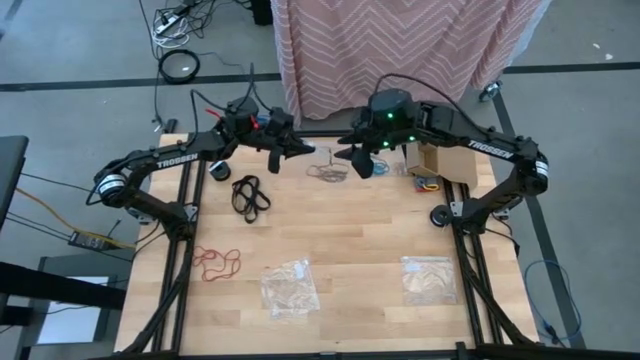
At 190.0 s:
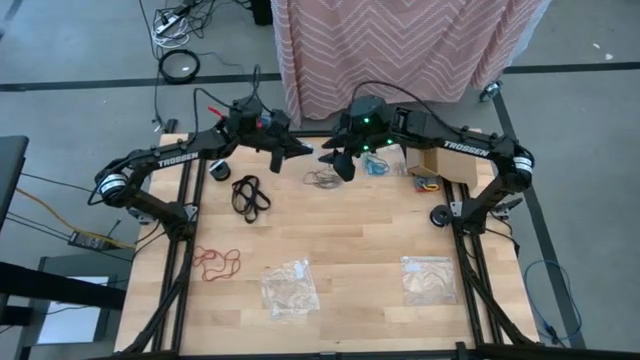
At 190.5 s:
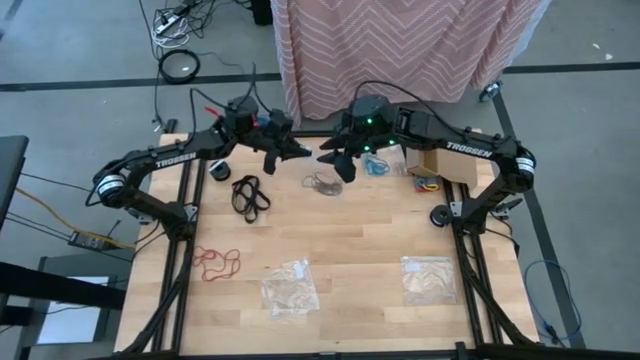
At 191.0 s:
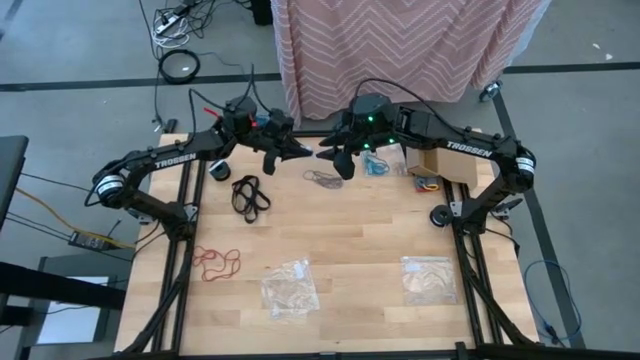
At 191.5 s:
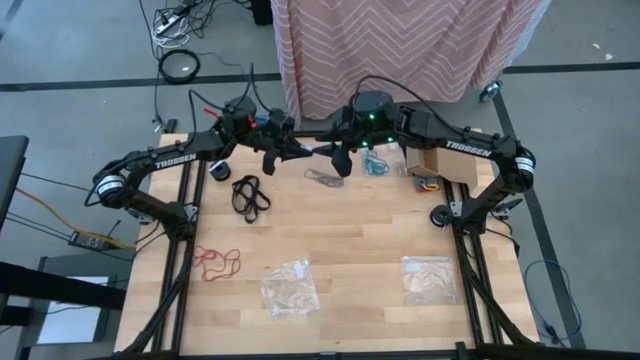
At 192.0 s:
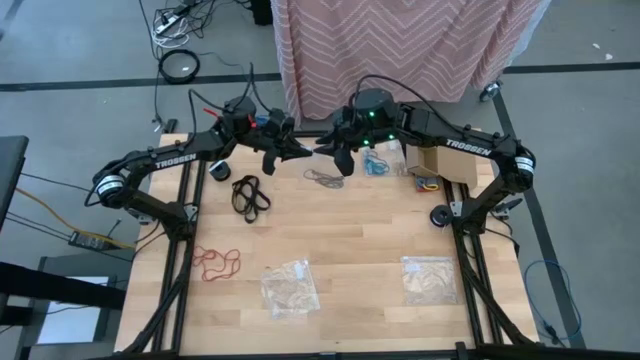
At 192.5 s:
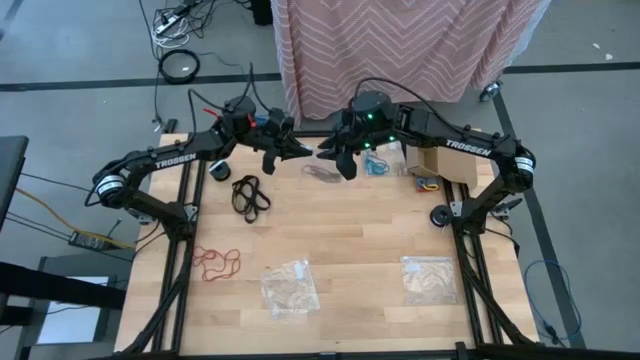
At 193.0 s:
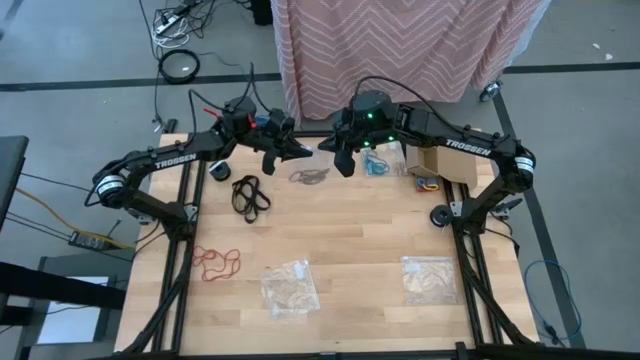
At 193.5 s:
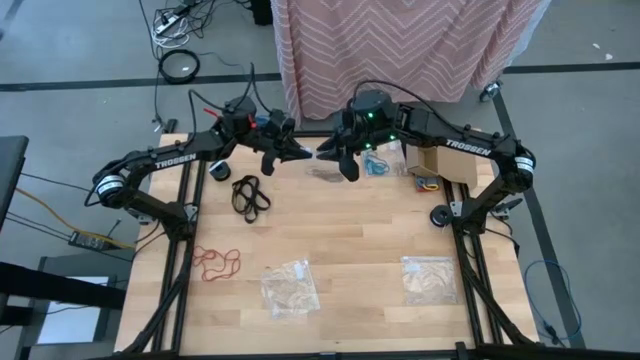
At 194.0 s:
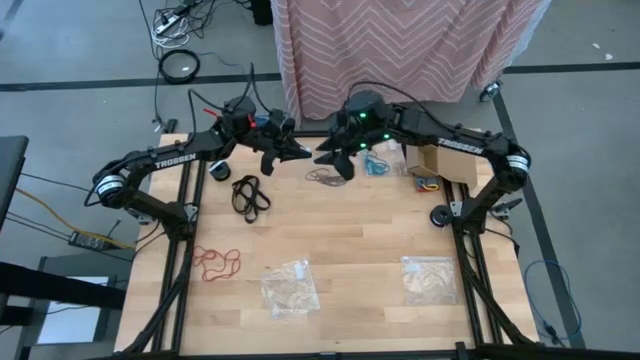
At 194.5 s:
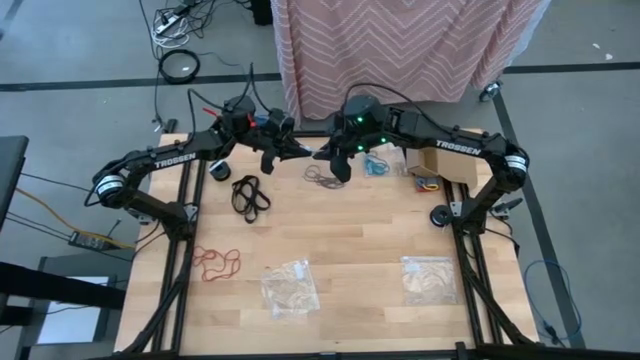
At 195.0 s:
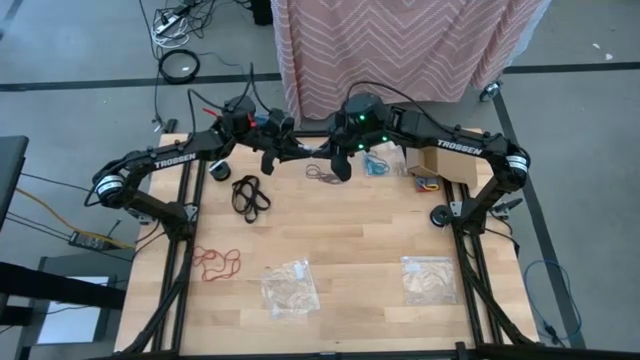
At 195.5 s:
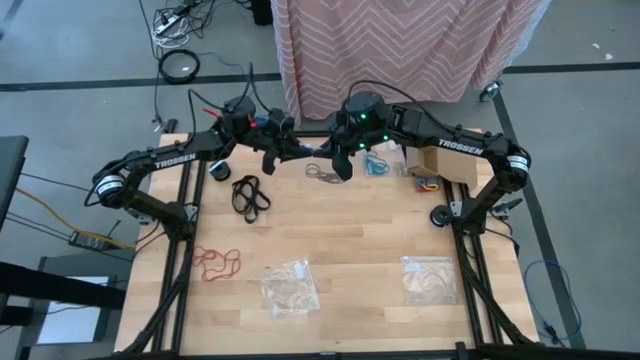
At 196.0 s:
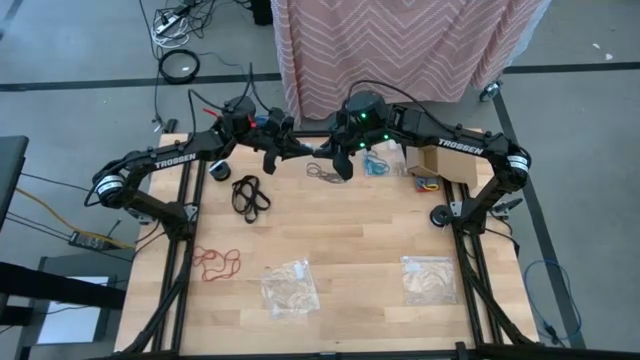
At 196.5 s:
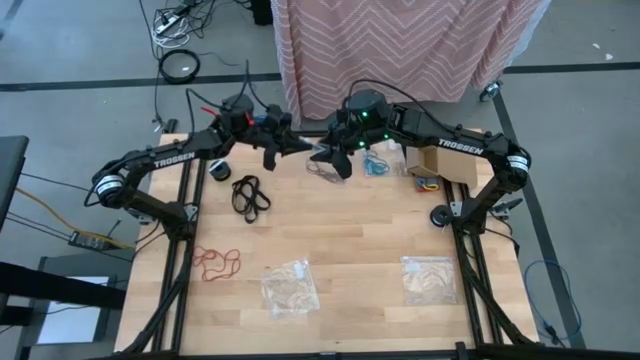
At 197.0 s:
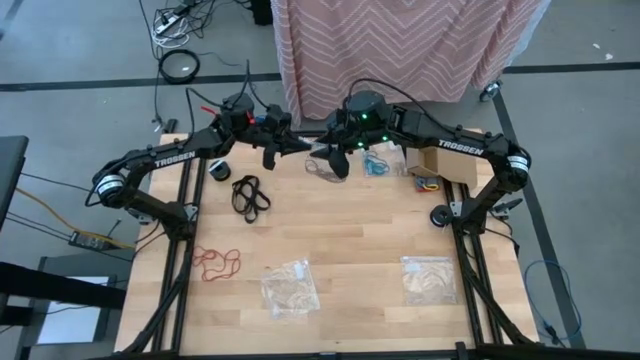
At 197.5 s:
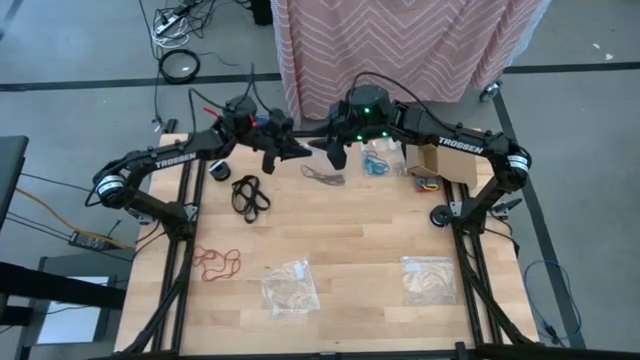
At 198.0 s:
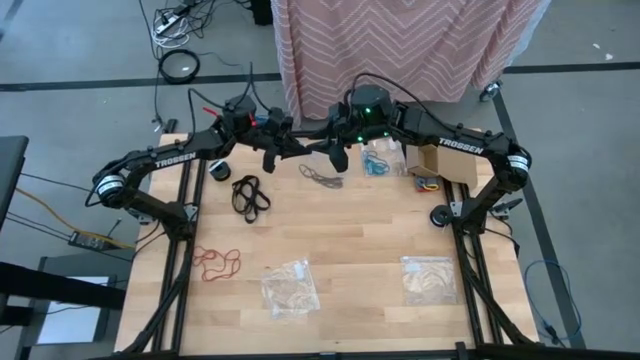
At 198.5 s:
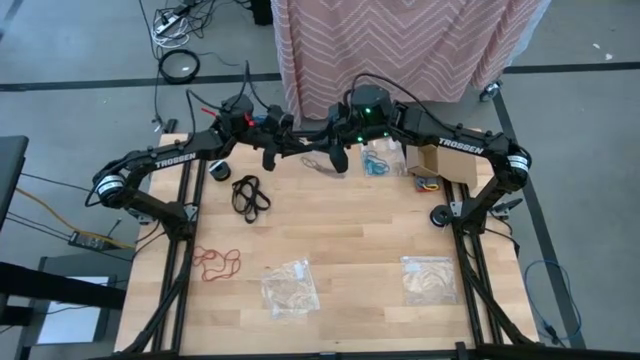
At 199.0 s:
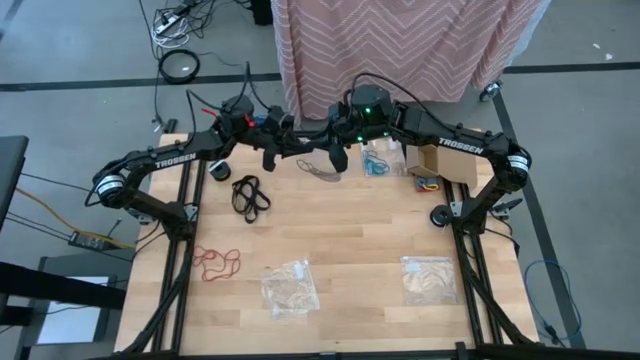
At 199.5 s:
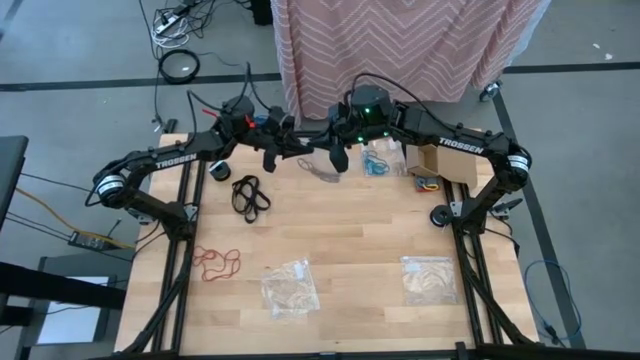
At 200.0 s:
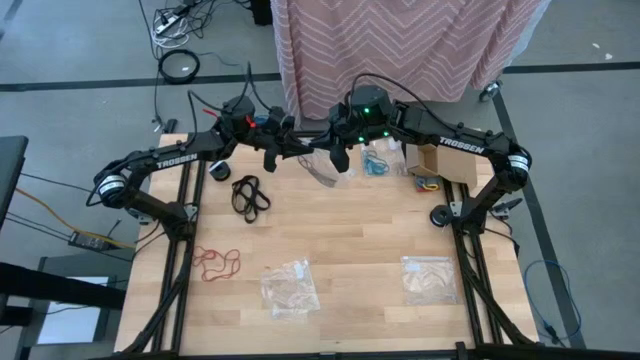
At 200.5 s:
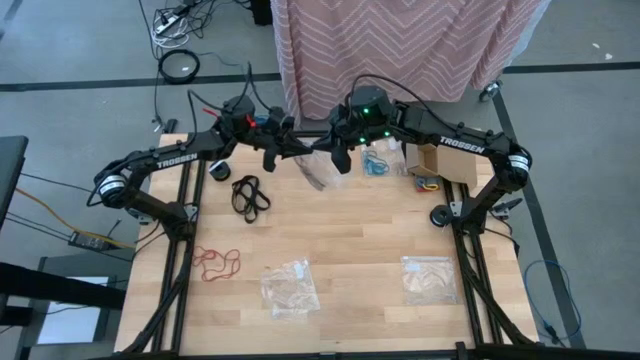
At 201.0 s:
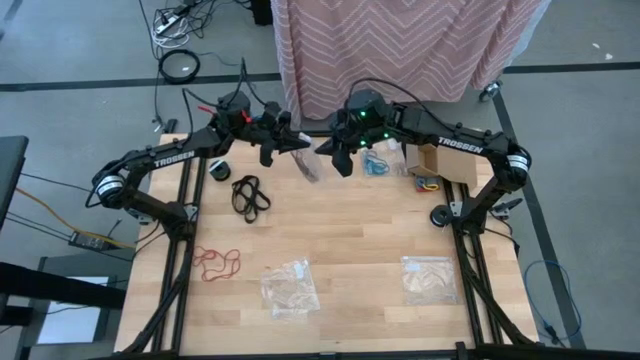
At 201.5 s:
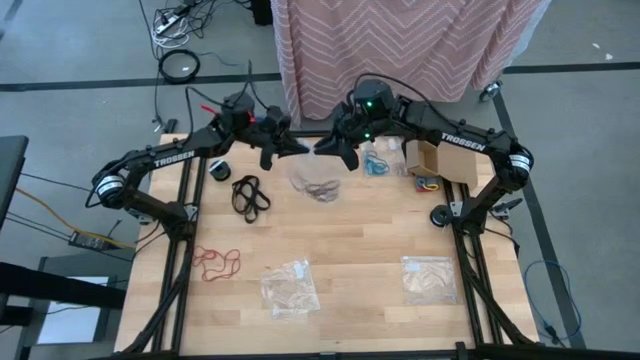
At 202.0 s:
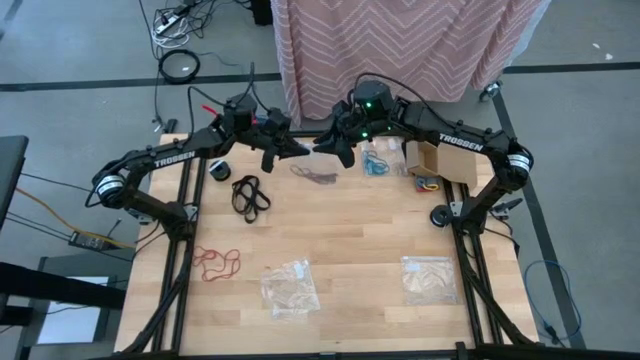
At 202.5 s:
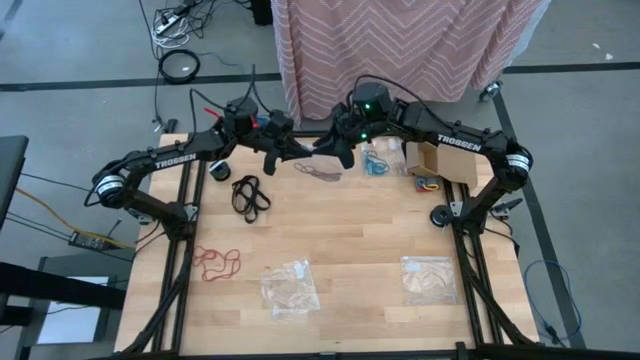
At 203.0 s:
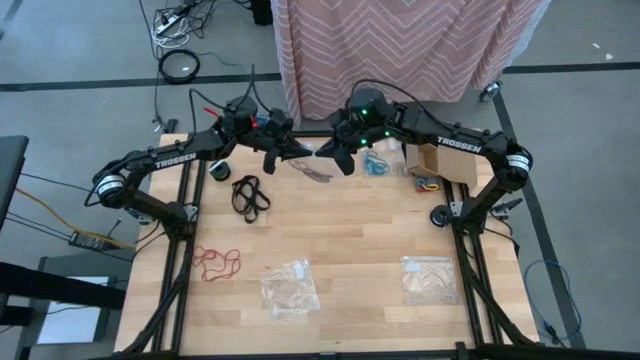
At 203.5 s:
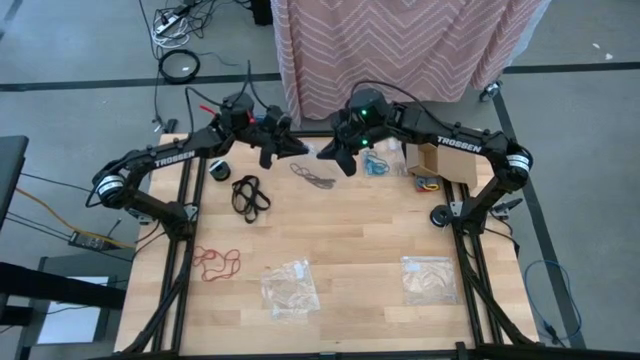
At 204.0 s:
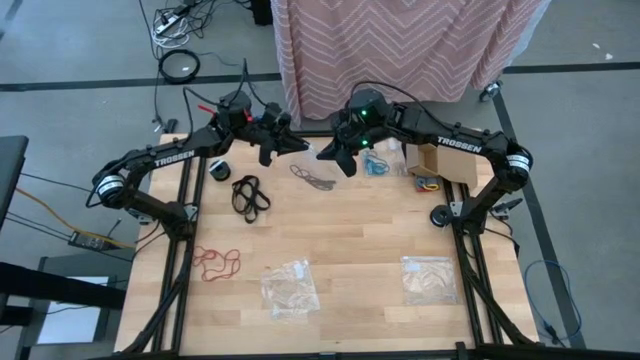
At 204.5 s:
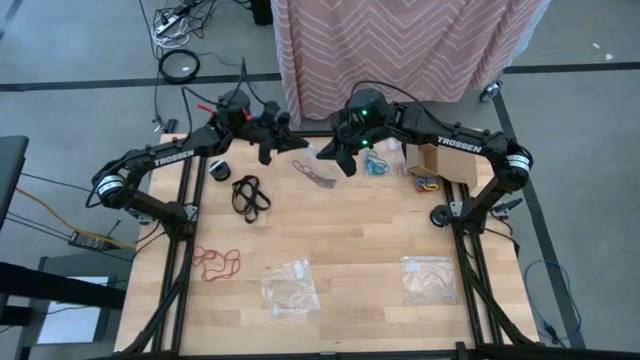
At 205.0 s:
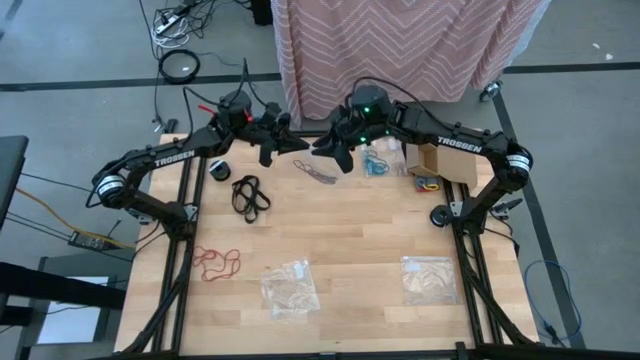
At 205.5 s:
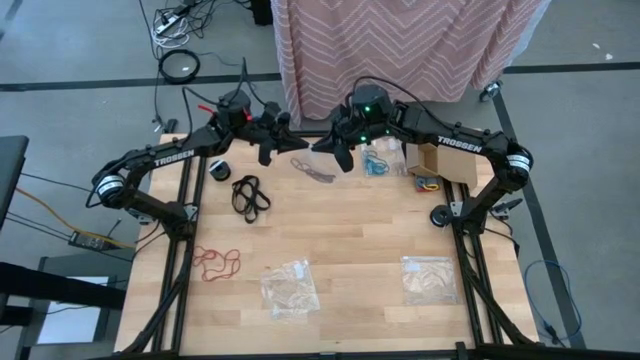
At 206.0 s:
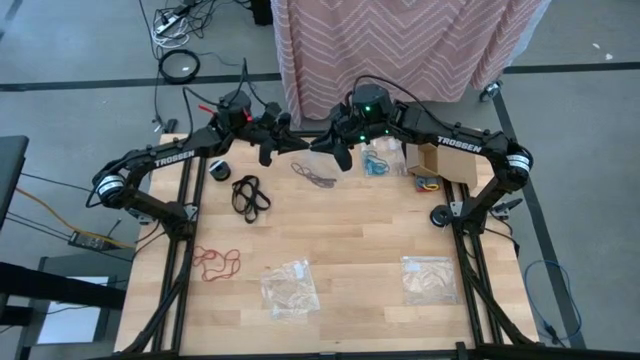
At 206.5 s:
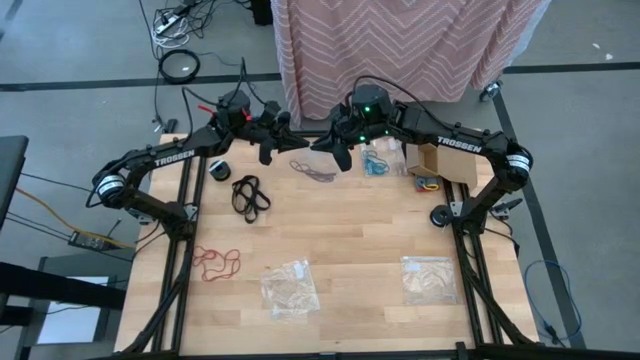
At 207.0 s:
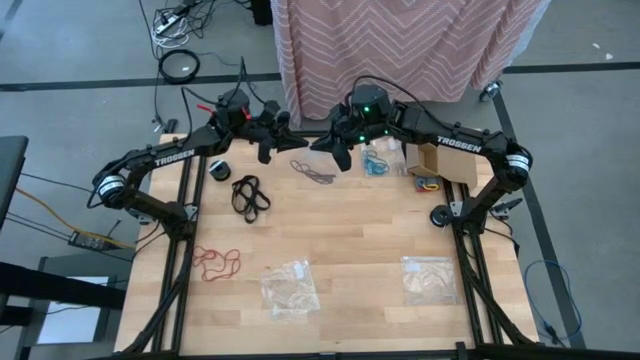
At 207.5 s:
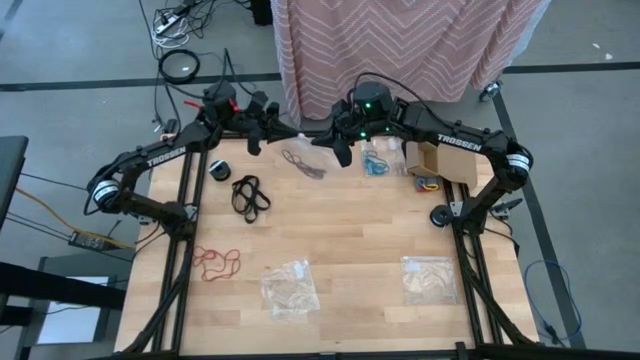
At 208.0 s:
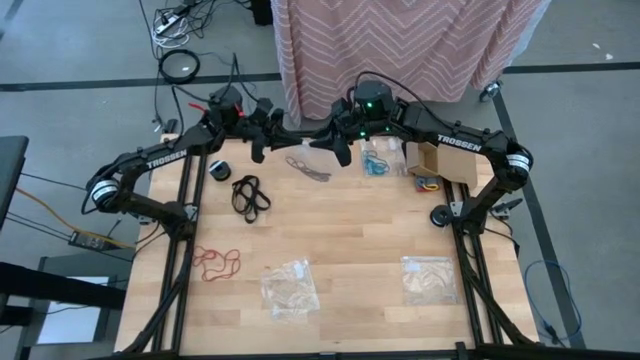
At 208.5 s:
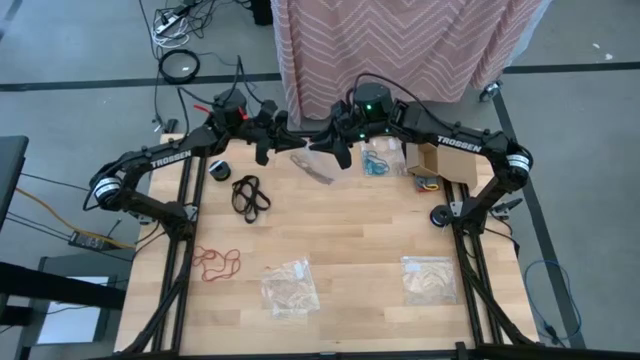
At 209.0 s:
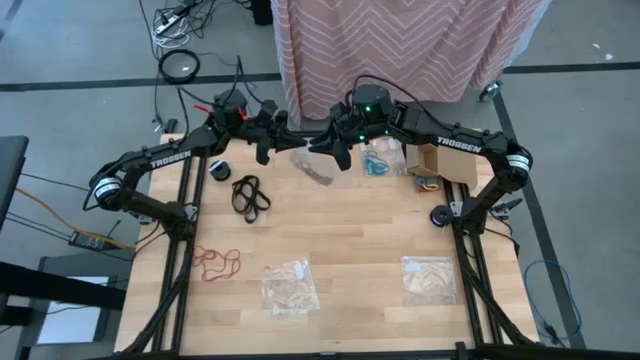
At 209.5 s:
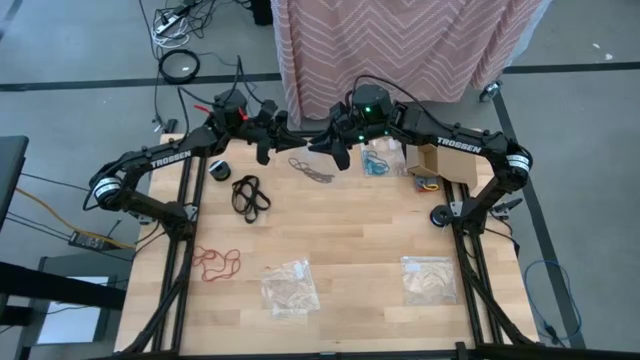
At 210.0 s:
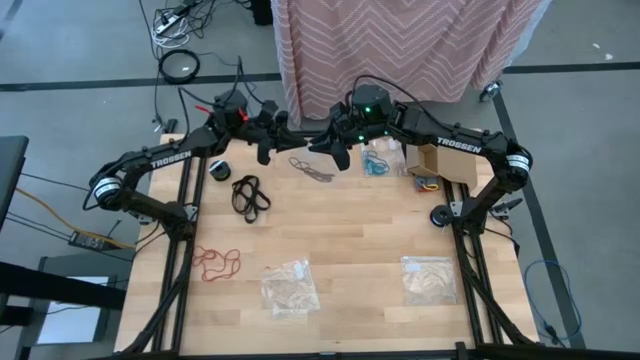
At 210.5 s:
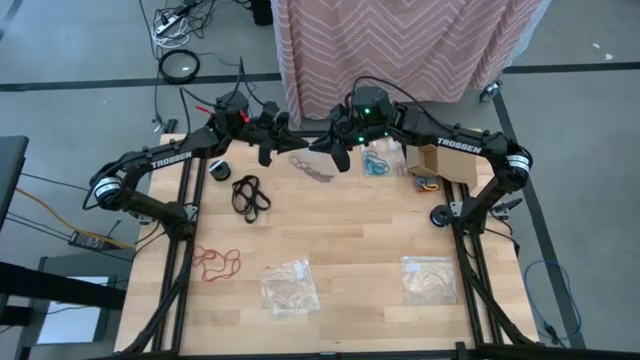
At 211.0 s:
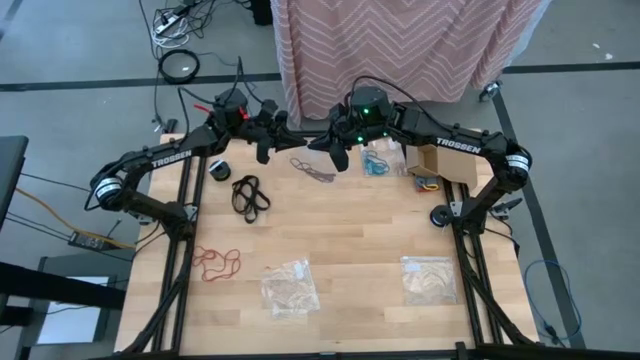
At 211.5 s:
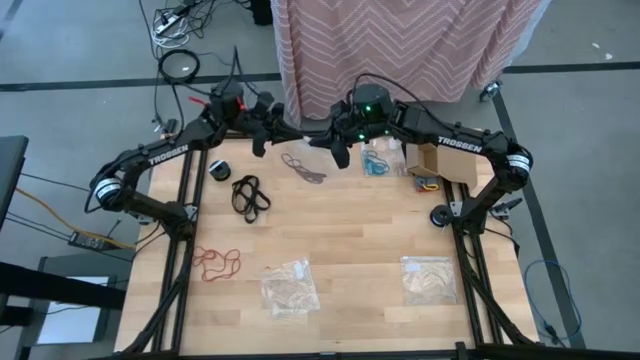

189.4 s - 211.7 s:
Task: Sort rubber bands
Close the bottom center transparent zip bag
